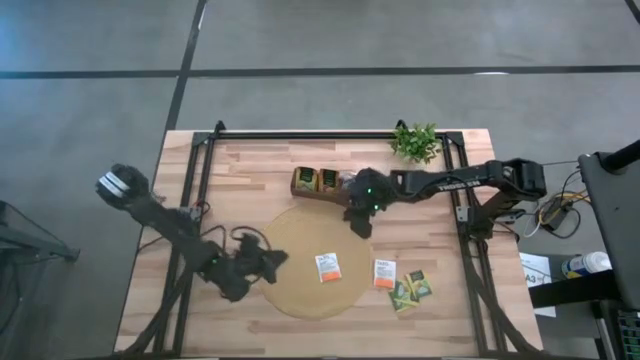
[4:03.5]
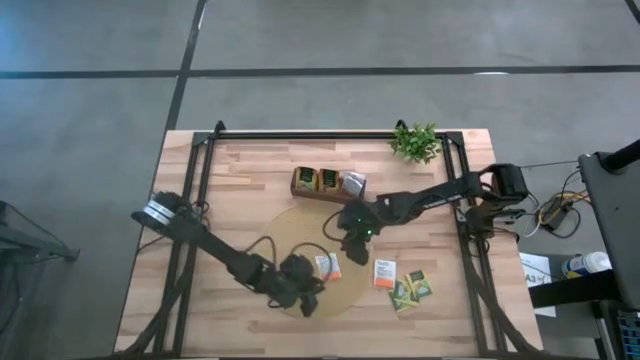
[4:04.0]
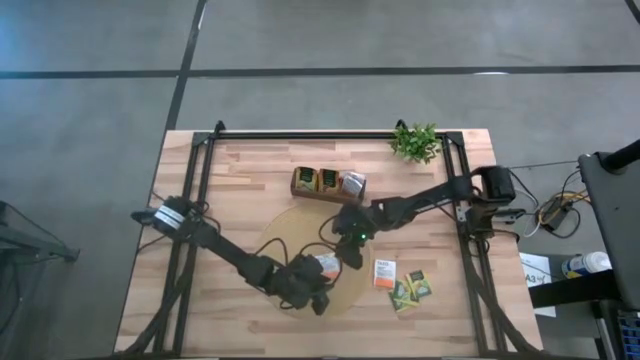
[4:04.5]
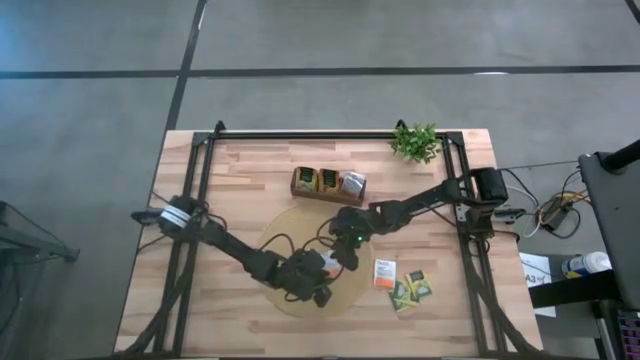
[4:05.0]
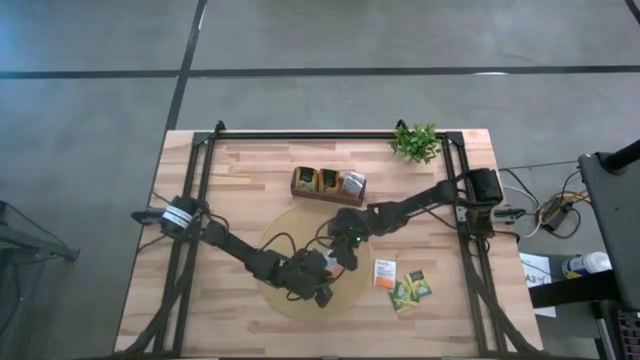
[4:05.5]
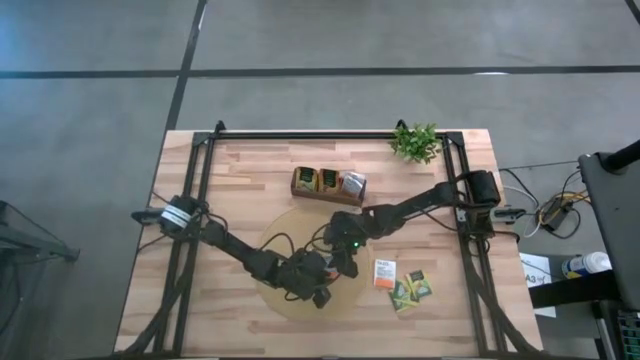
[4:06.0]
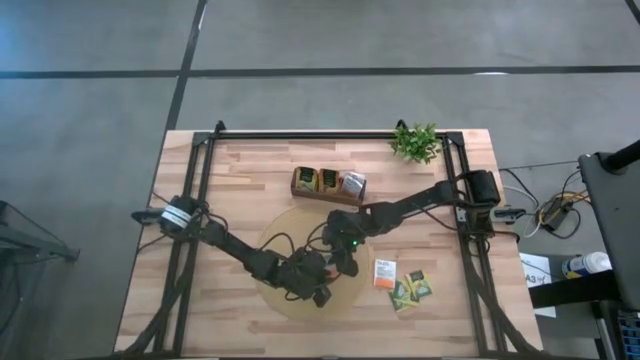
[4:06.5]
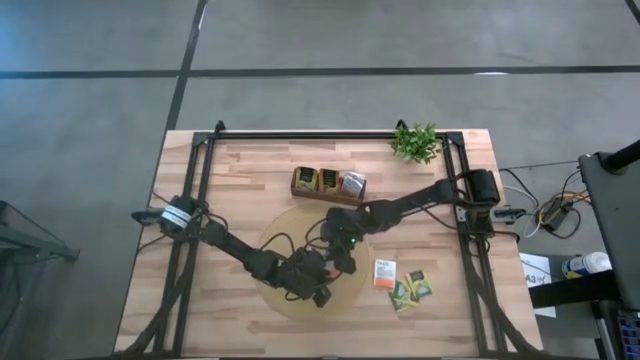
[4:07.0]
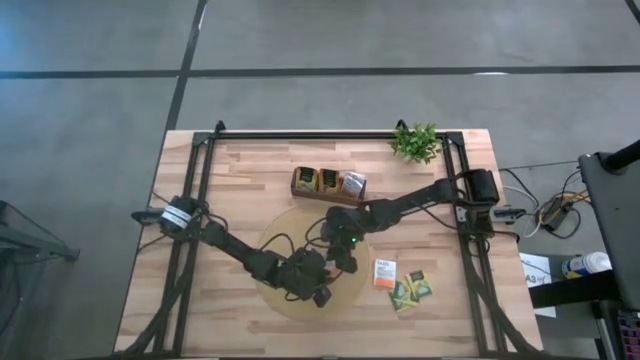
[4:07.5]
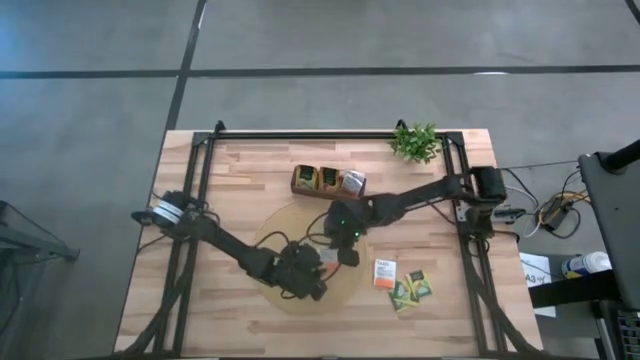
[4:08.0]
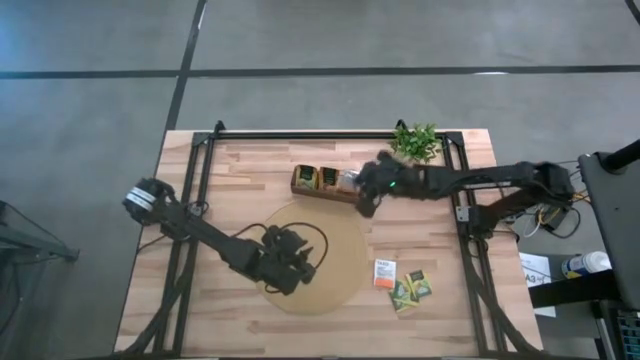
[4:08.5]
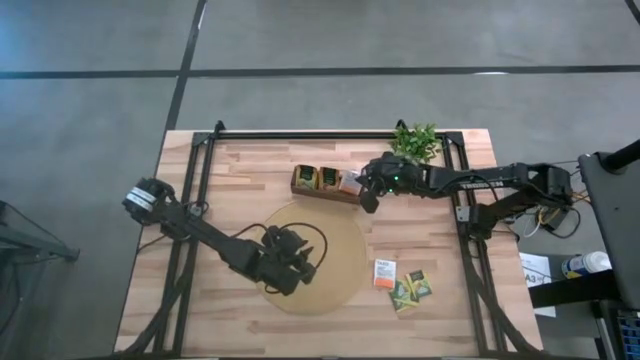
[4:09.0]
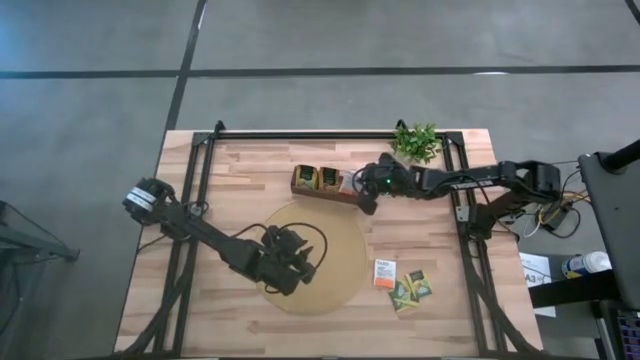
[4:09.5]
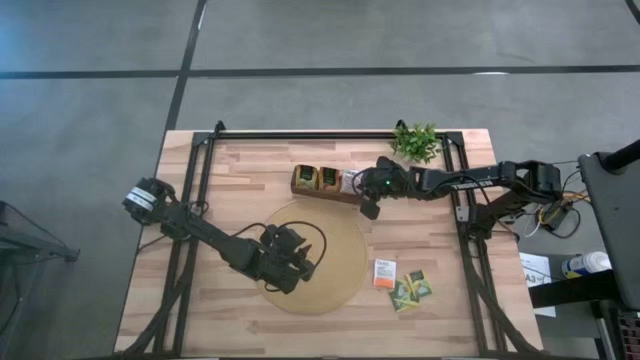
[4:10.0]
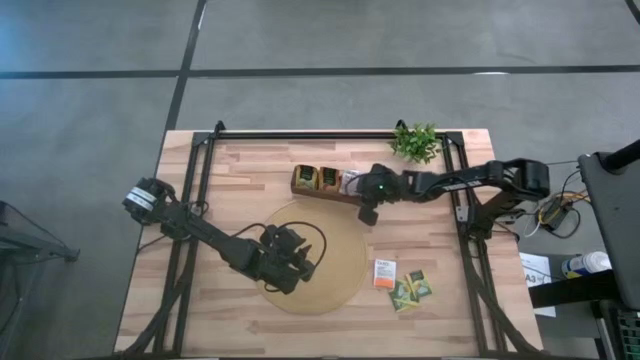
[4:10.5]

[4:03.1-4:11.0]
Task: Pick & Place Tea
Put the orange tea bag into the right section of the wooden organizer

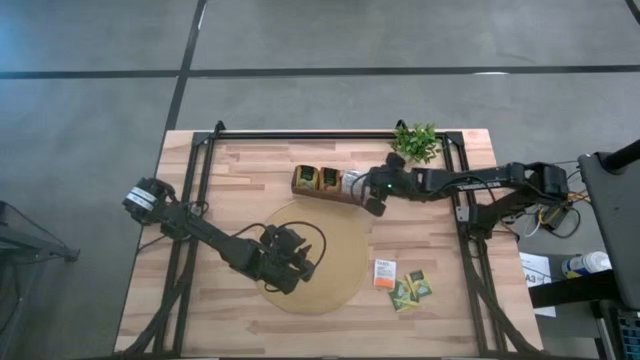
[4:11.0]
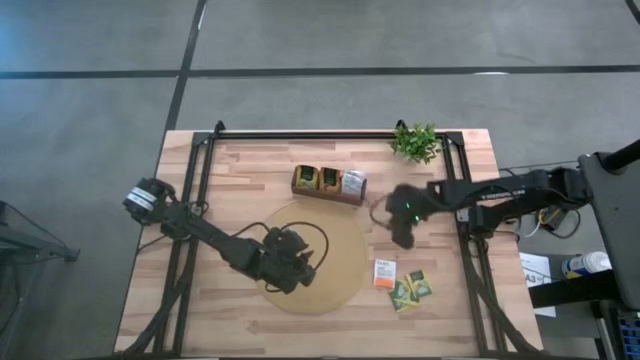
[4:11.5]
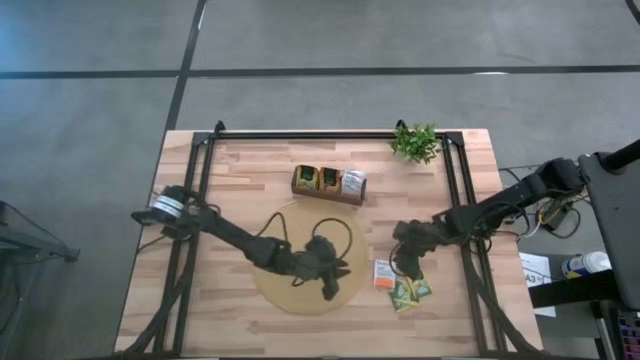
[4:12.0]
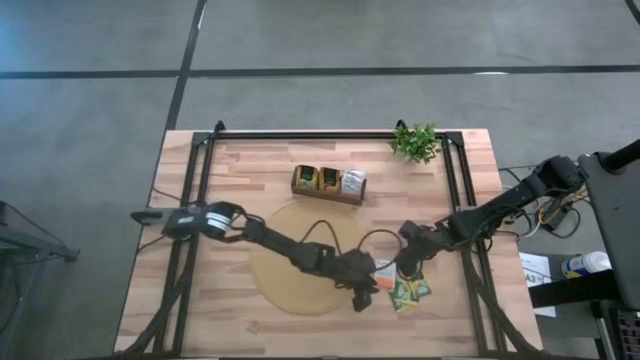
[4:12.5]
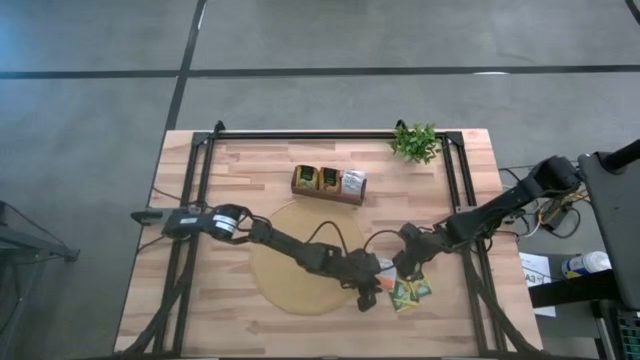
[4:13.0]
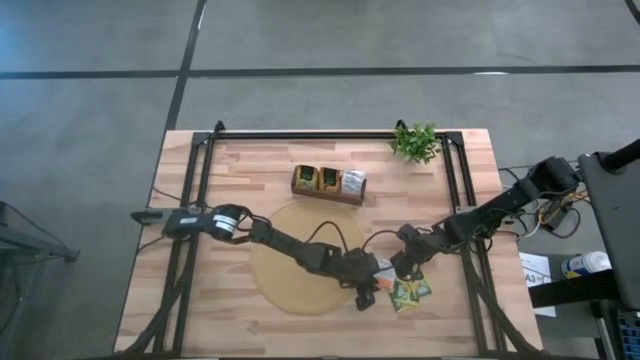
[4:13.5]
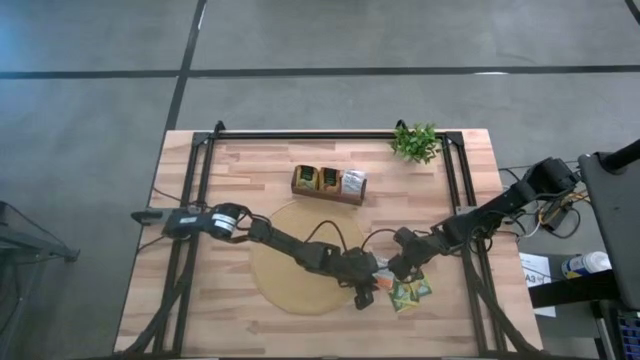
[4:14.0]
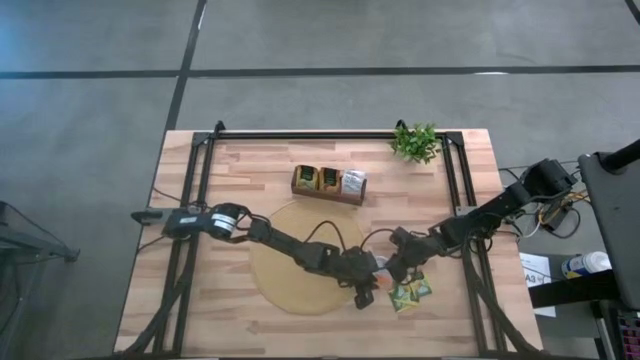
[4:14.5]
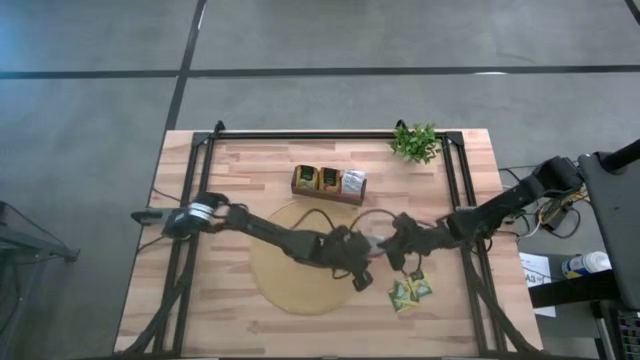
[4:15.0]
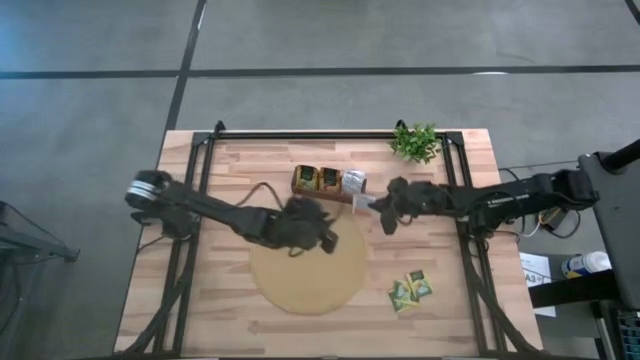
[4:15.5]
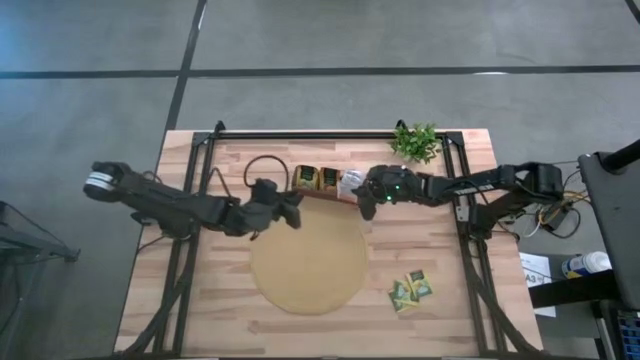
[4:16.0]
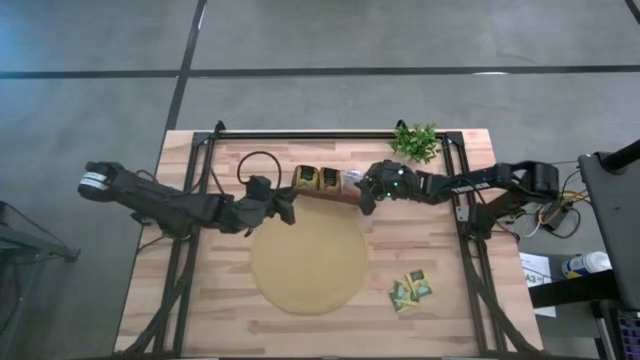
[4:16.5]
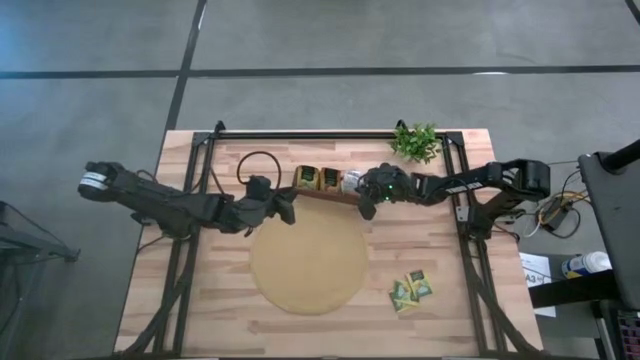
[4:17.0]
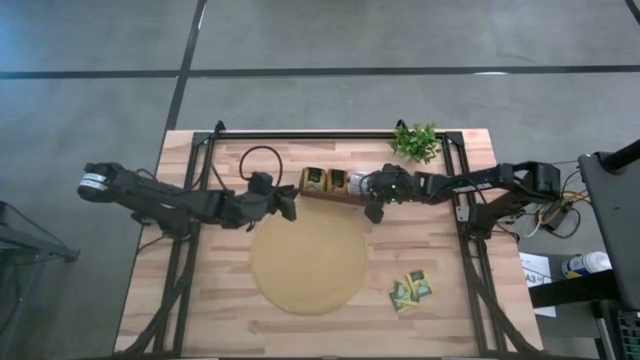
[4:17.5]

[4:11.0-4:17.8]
Put the orange tea bag into the right section of the wooden organizer

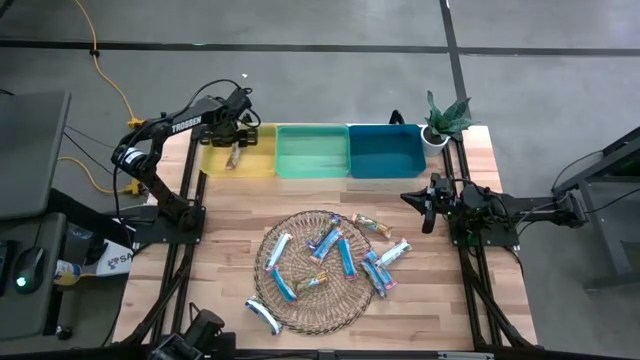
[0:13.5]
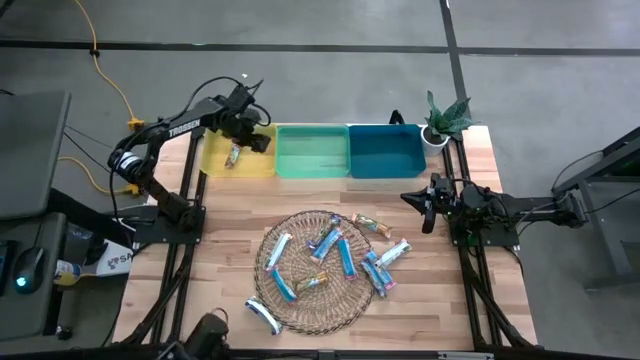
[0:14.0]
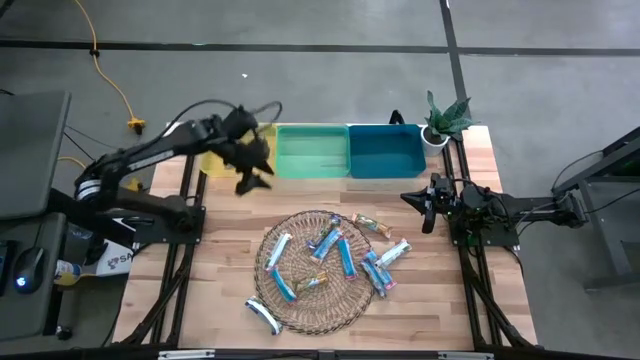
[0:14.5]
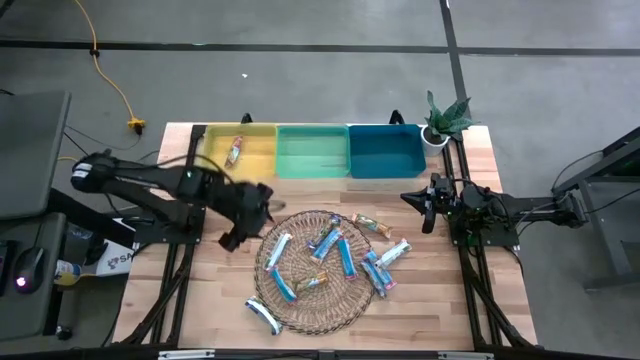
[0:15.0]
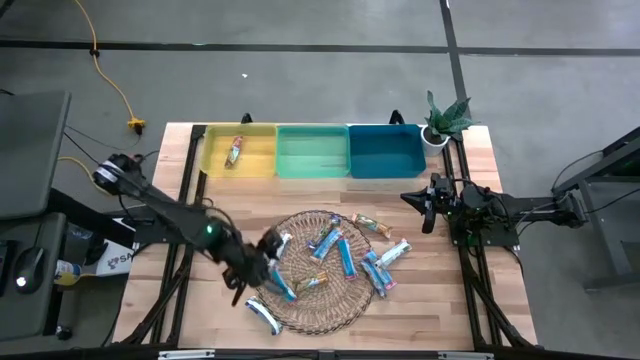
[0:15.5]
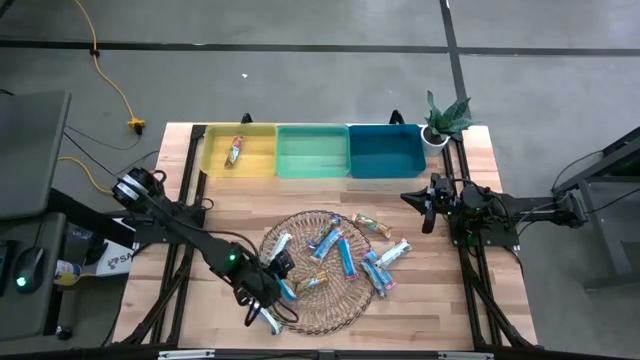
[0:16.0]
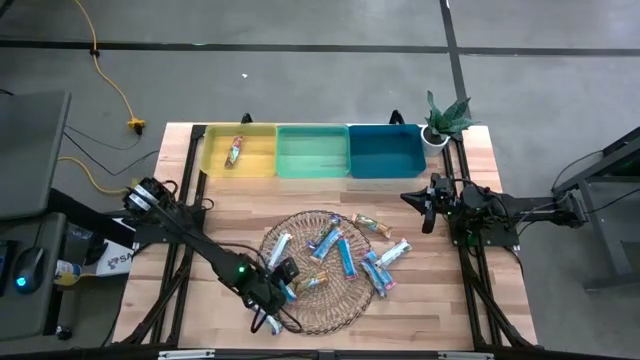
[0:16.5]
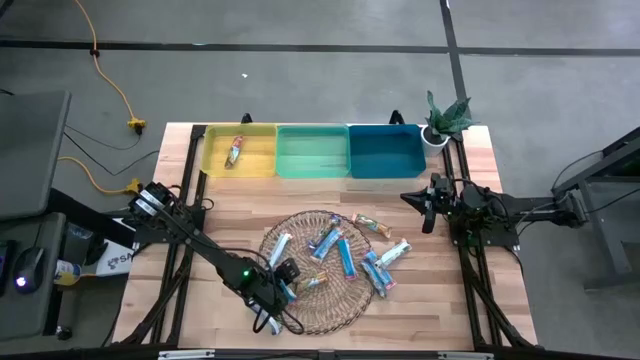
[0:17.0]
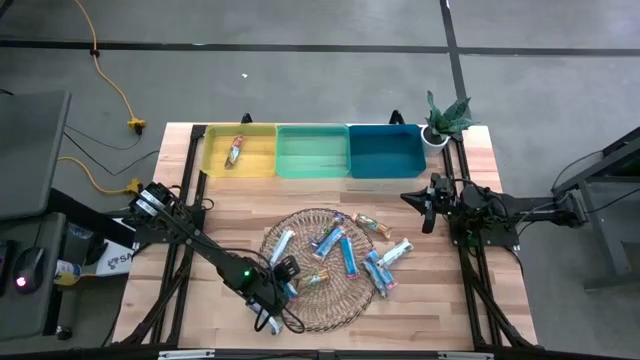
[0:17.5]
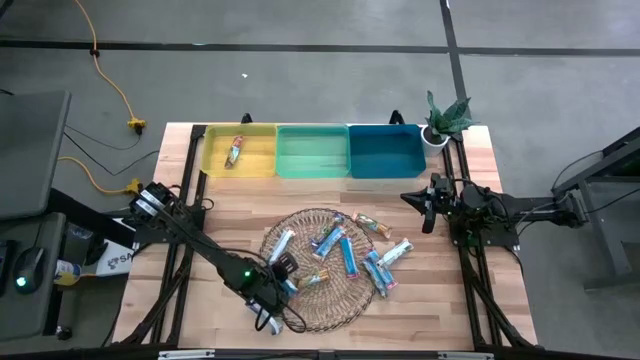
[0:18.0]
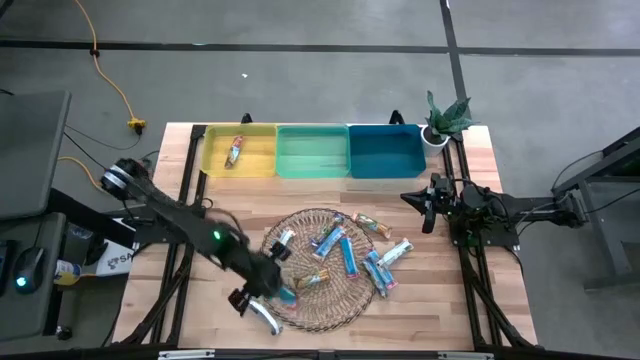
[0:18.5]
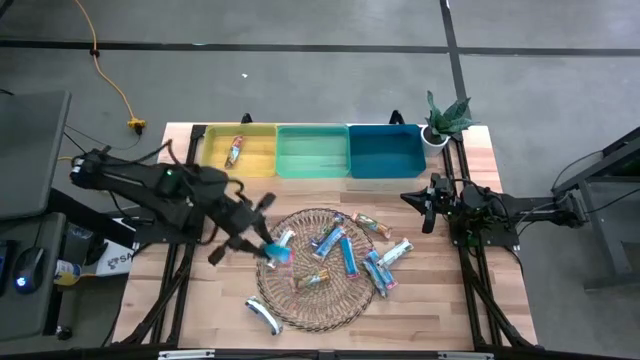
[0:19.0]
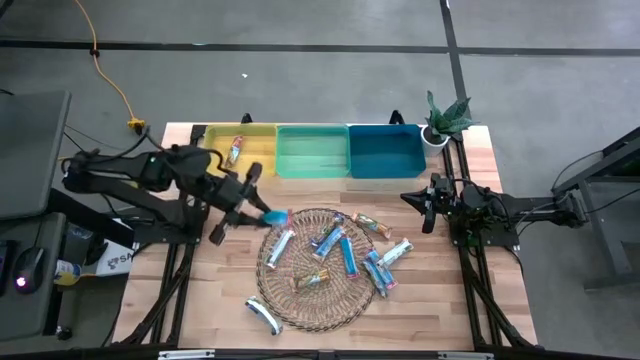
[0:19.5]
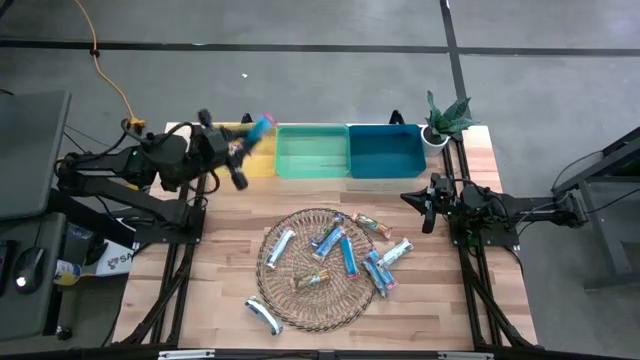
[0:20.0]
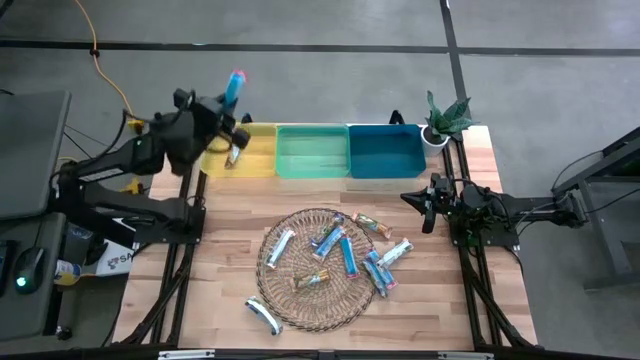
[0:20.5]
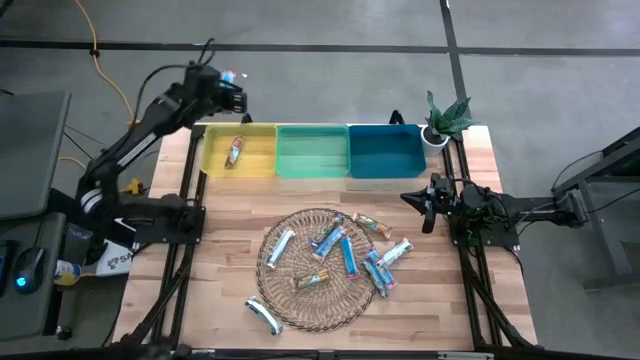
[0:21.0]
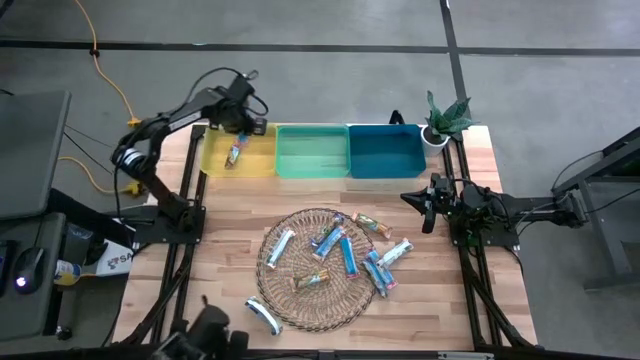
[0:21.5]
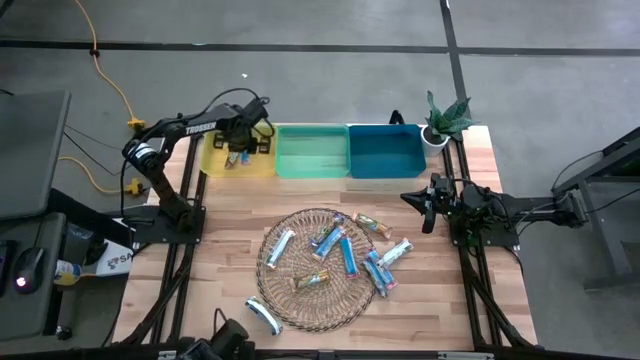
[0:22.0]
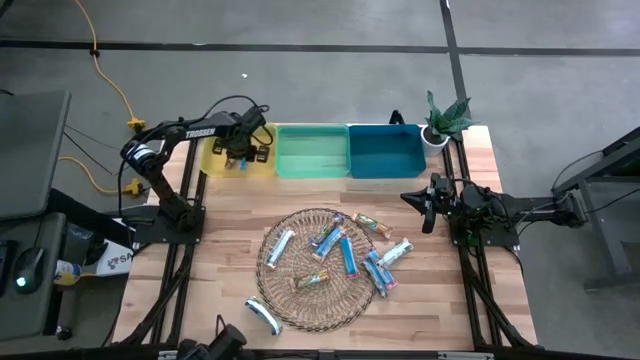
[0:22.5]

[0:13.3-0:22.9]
Task: Pick and place Granola Bars by type
Put the red granola bar into the yellow bin
